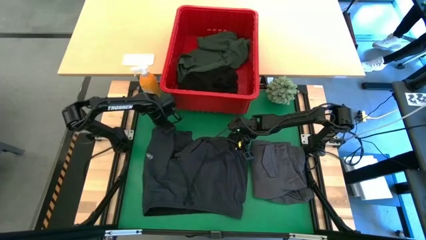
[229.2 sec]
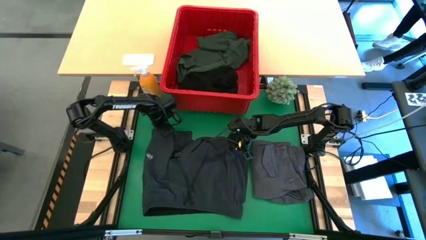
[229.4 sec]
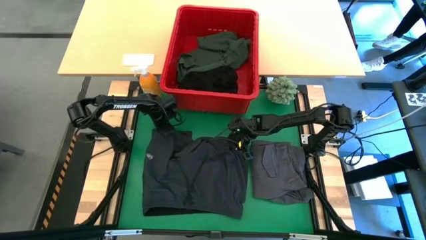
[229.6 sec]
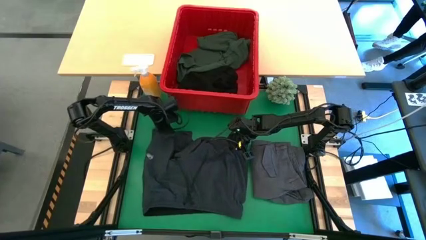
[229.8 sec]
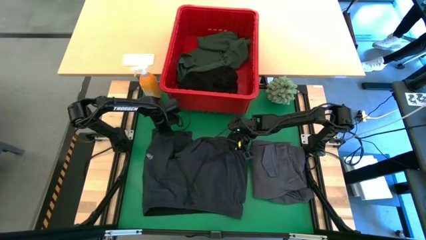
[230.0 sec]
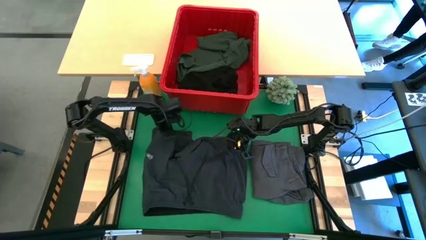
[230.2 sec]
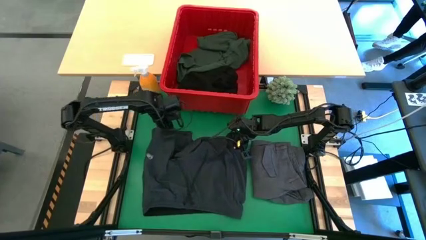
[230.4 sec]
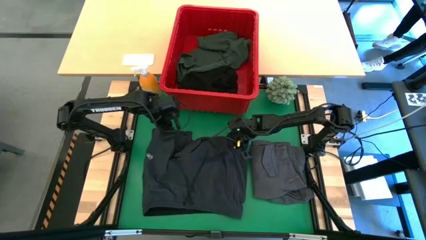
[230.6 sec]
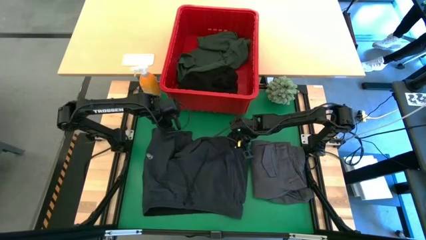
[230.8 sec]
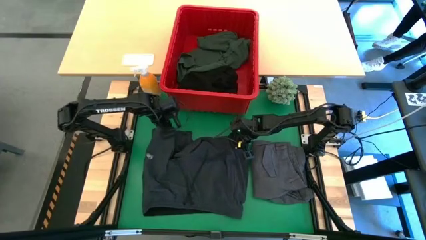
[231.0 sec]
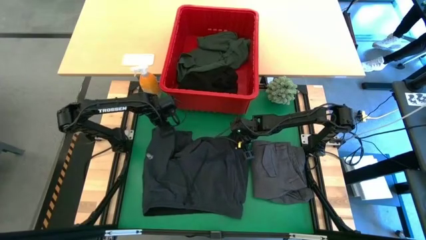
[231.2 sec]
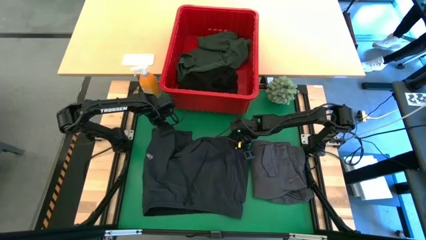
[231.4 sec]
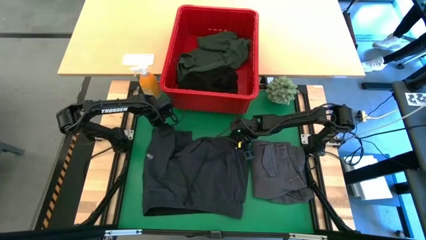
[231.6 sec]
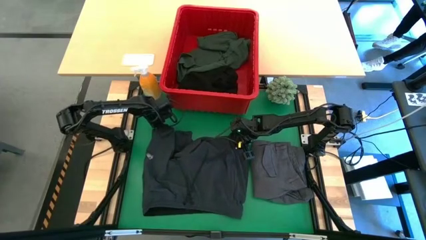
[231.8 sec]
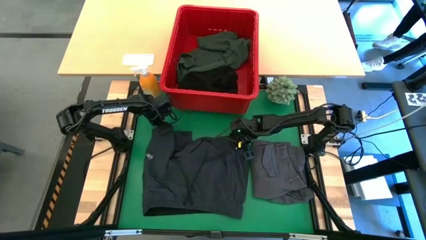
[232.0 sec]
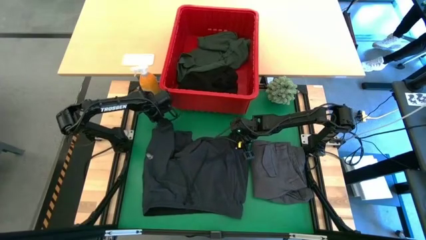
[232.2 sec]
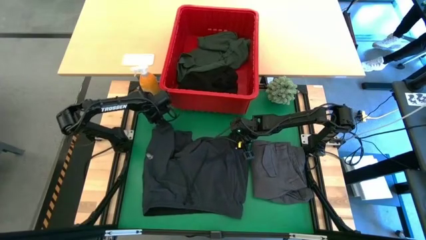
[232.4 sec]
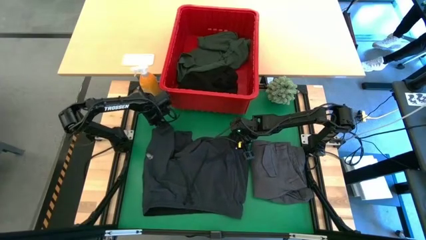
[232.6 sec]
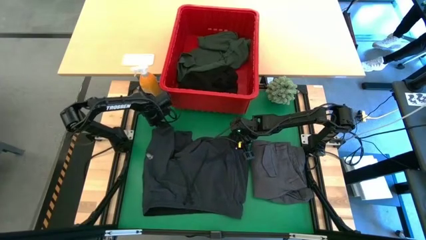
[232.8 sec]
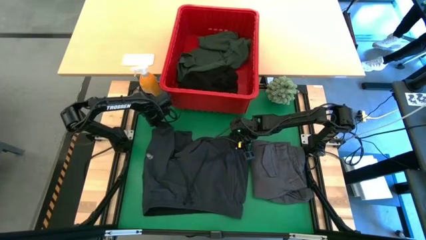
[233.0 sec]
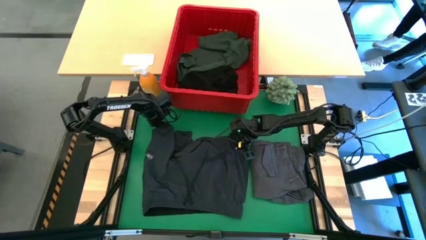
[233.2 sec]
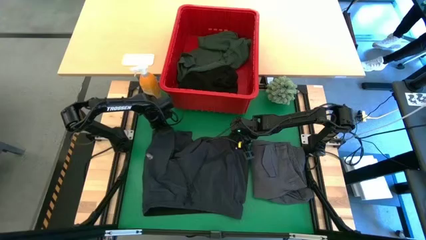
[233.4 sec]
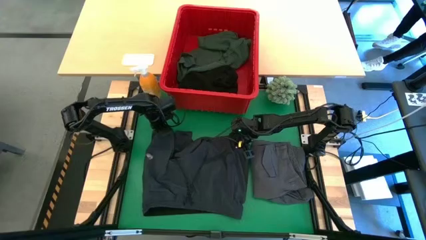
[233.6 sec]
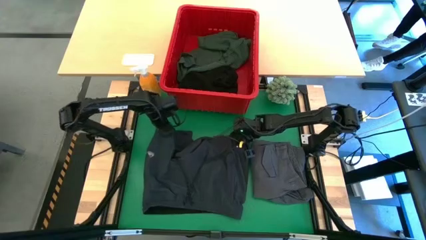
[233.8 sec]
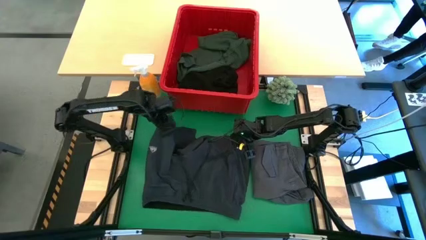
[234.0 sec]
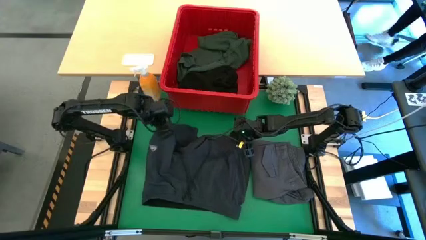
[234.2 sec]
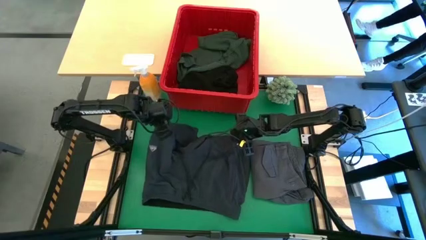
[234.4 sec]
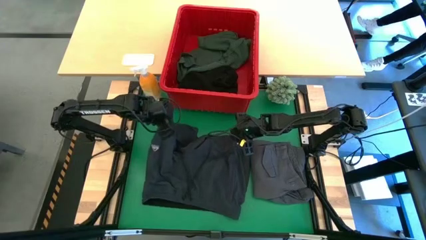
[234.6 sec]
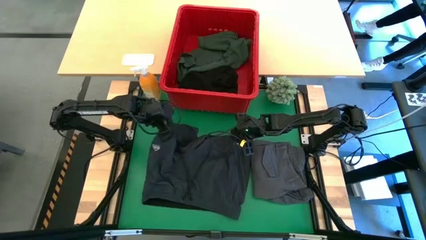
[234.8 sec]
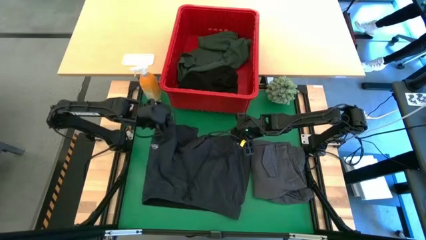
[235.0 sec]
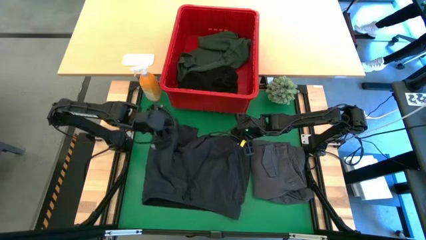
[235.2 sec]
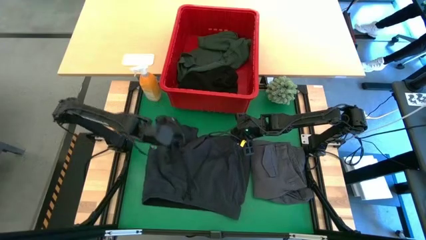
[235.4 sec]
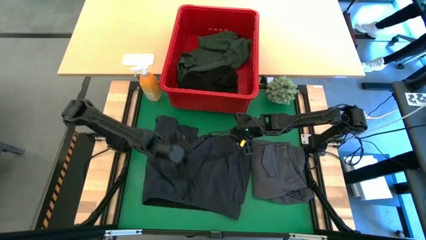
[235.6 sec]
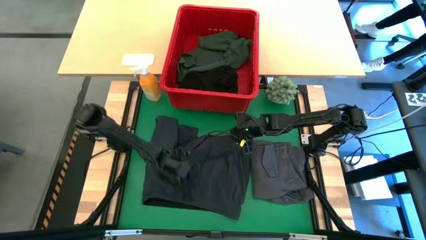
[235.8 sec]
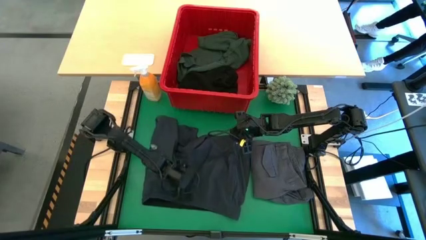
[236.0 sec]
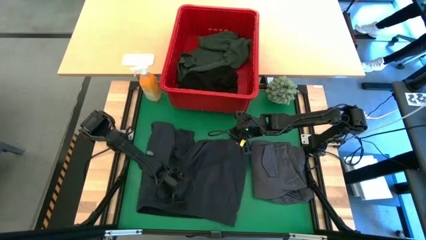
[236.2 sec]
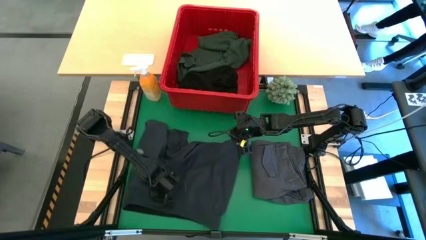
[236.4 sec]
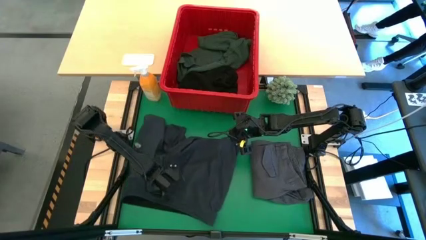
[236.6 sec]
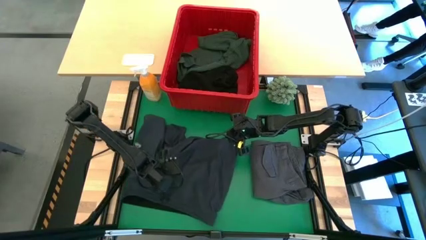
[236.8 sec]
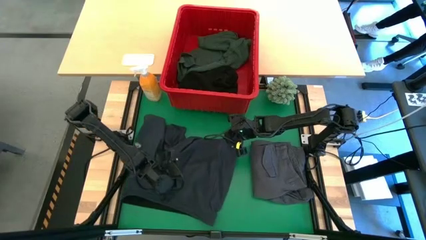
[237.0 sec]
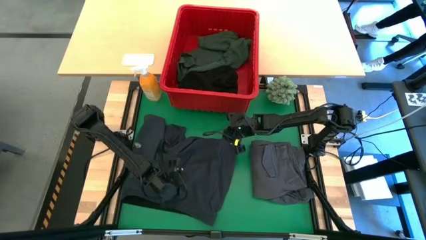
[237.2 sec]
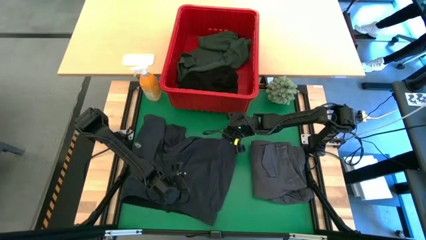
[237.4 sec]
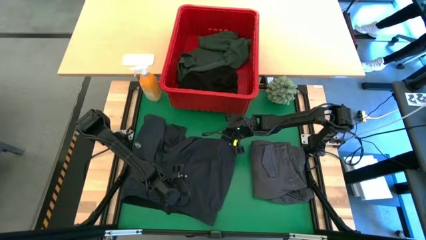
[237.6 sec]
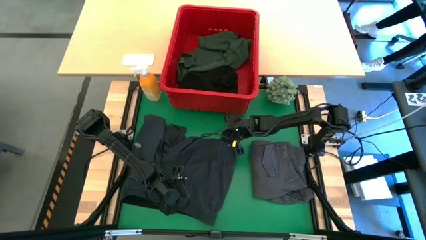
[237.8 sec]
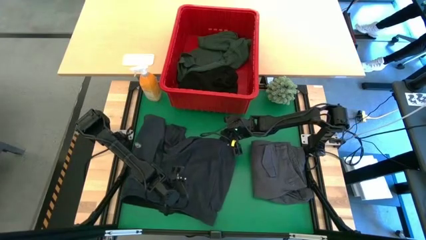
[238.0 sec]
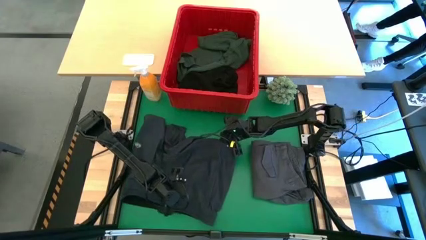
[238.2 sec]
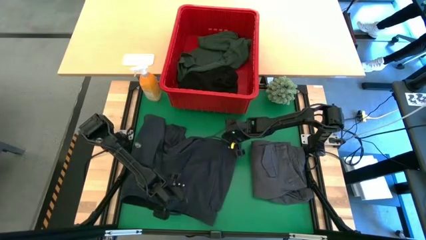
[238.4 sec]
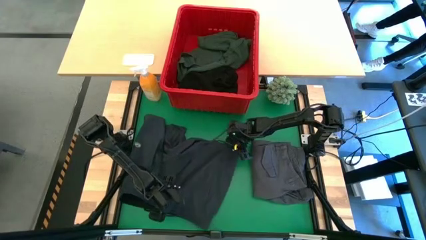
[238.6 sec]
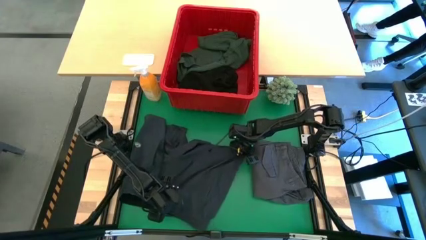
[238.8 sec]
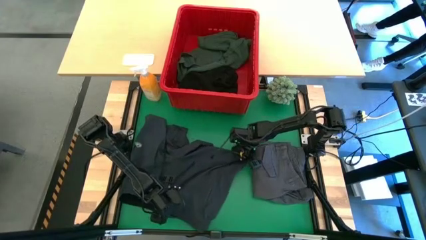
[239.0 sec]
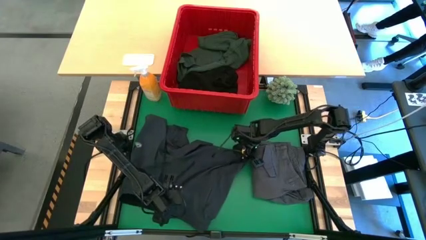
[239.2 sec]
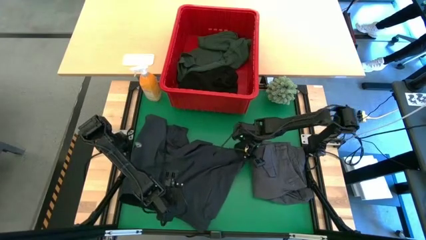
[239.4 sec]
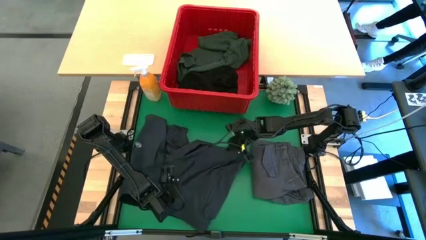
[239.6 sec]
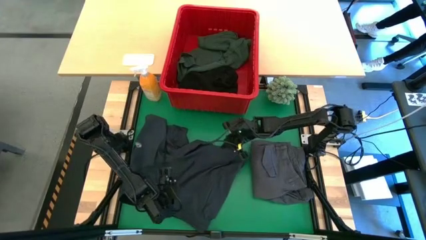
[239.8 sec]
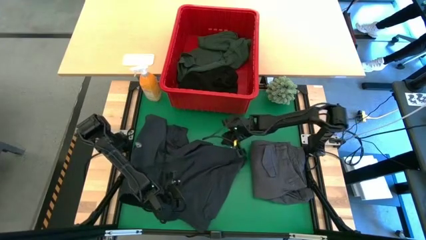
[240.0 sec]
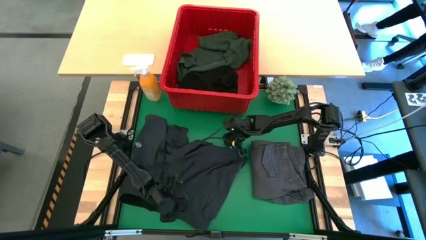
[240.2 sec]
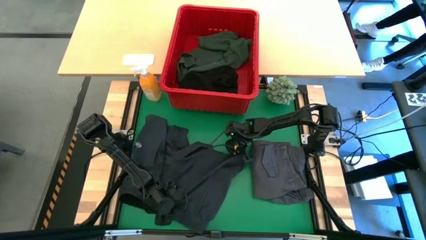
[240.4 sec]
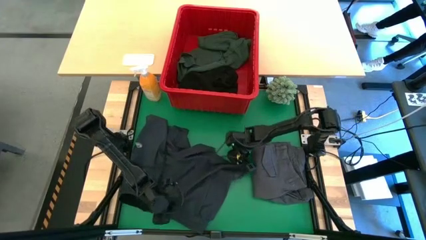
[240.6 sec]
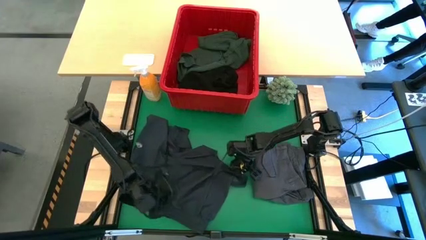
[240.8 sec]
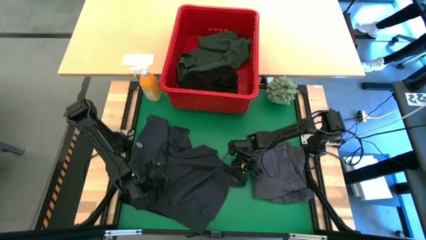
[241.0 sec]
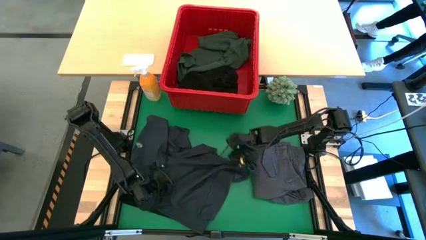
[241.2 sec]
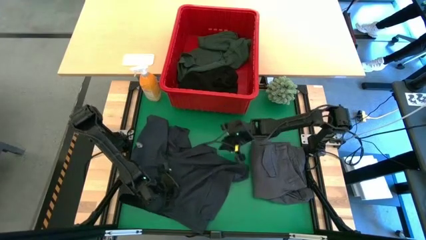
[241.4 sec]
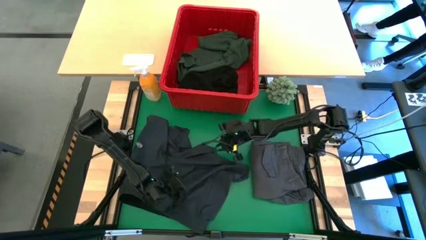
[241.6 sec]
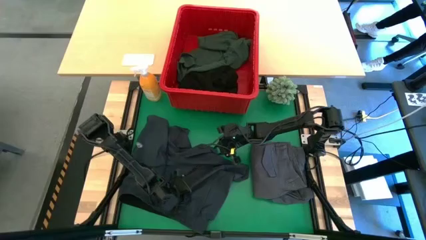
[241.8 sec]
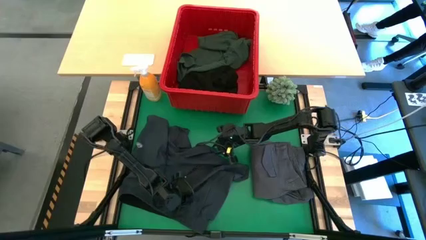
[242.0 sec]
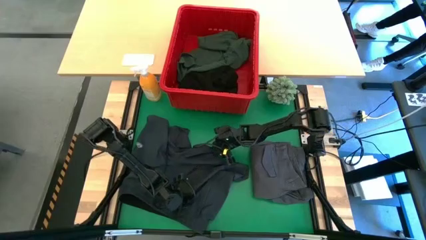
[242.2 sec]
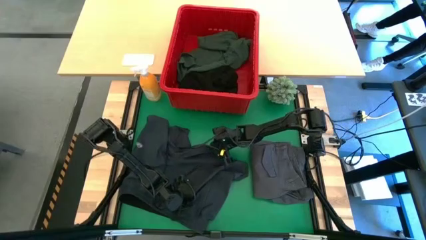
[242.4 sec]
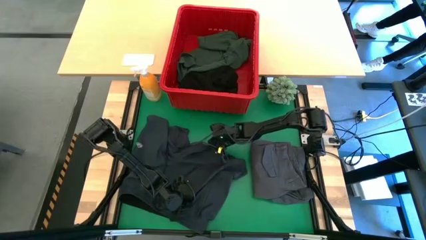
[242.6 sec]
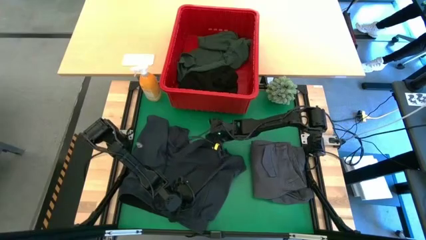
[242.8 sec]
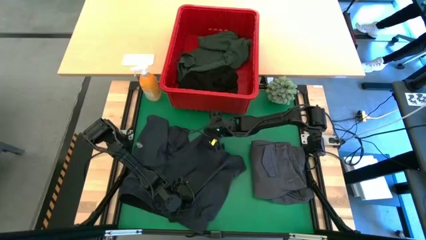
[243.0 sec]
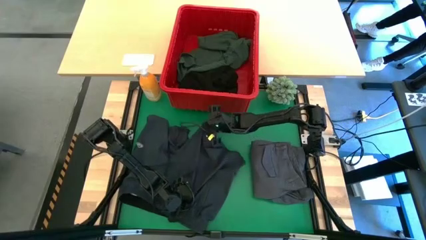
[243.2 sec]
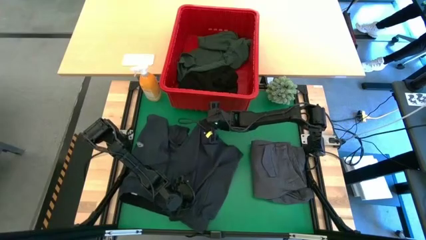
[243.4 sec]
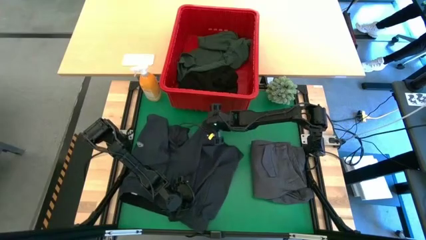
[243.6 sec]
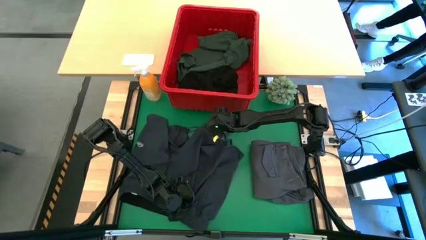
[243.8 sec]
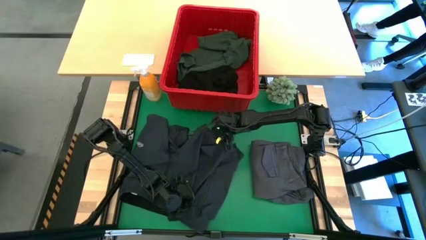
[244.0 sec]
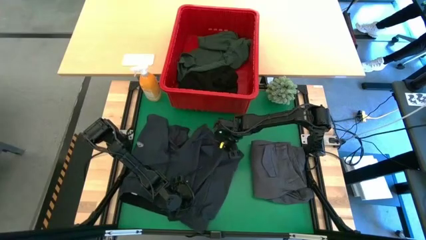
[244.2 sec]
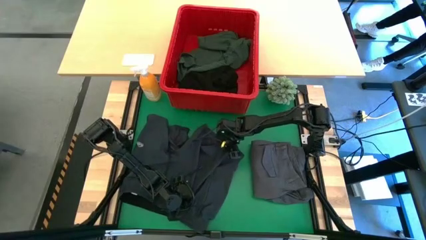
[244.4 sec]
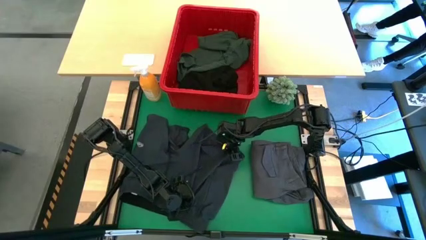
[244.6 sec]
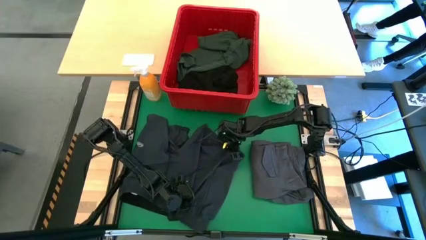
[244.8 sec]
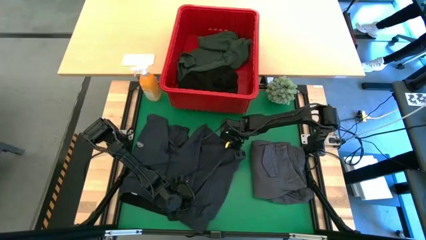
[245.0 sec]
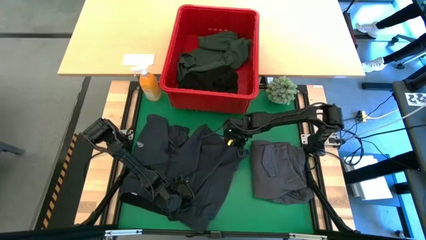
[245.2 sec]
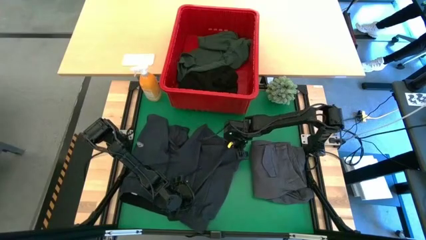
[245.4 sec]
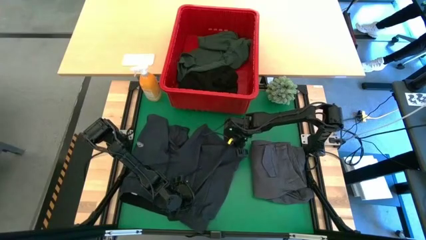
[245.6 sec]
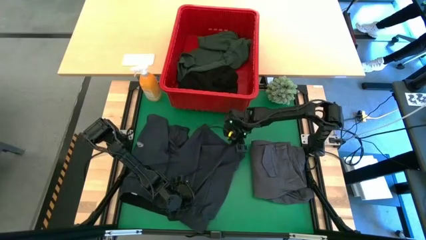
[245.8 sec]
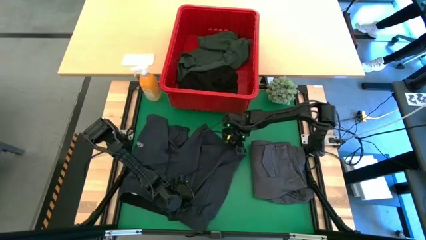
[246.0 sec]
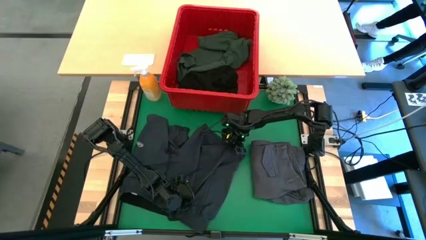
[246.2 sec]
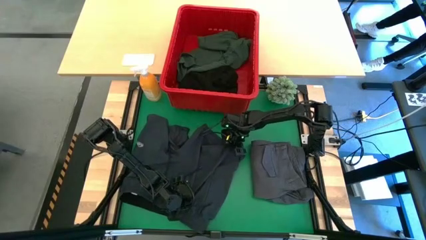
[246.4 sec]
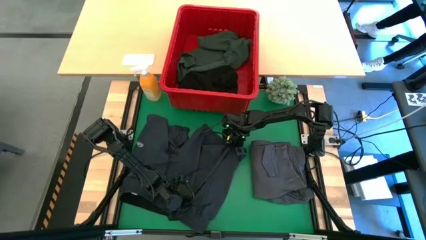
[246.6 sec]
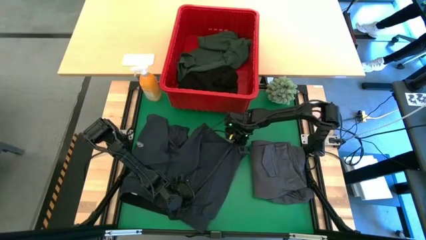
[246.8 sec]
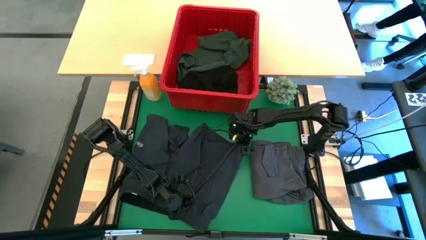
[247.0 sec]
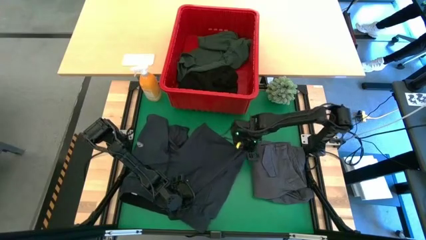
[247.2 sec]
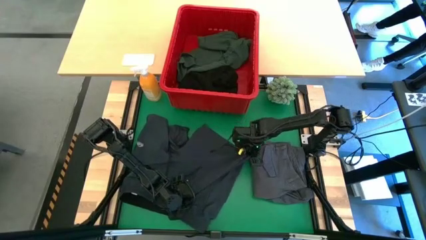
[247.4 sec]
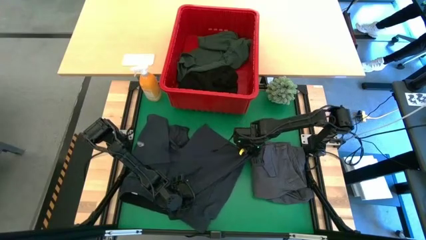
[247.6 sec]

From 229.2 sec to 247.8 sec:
Task: Fold Laundry from Bin
Fold the dark gray short
